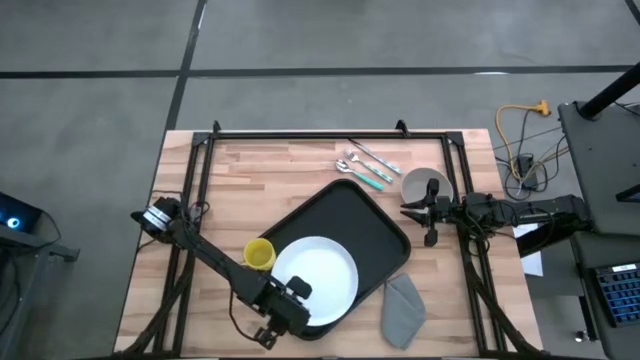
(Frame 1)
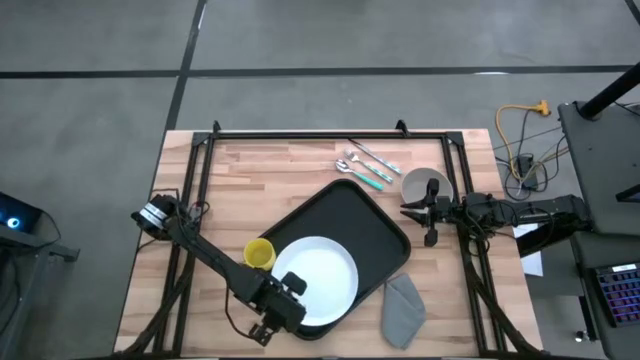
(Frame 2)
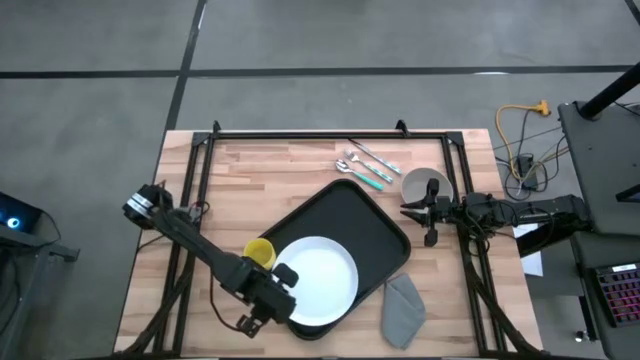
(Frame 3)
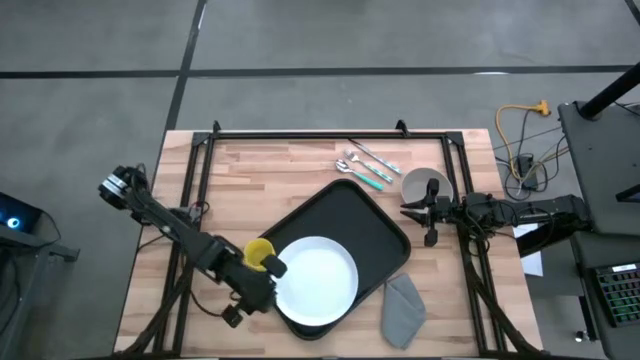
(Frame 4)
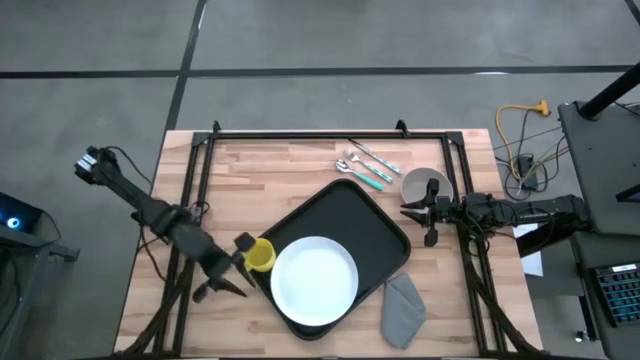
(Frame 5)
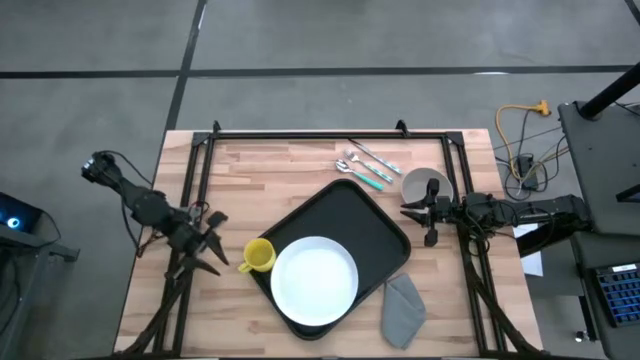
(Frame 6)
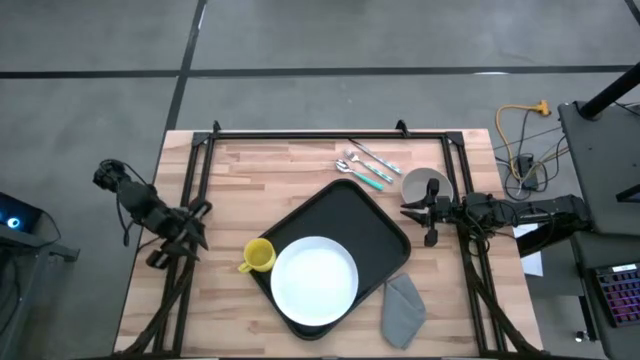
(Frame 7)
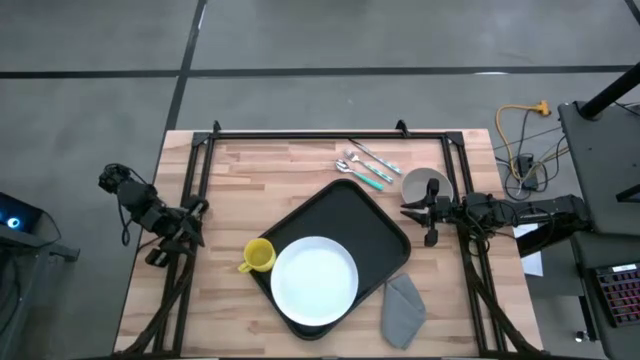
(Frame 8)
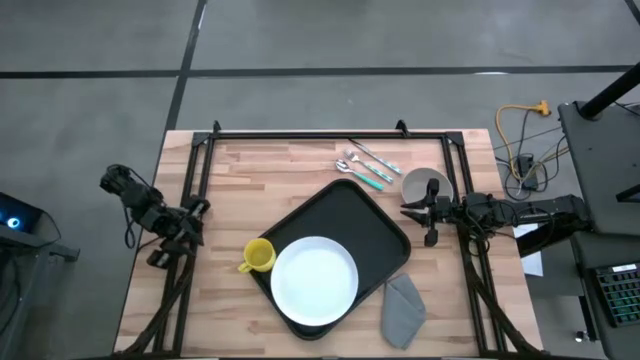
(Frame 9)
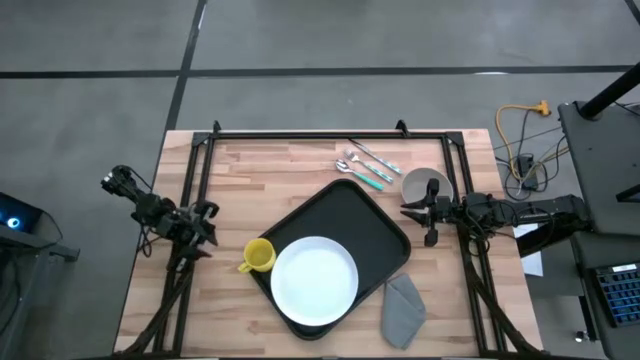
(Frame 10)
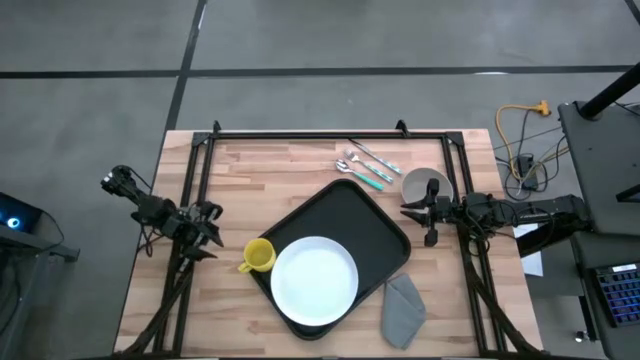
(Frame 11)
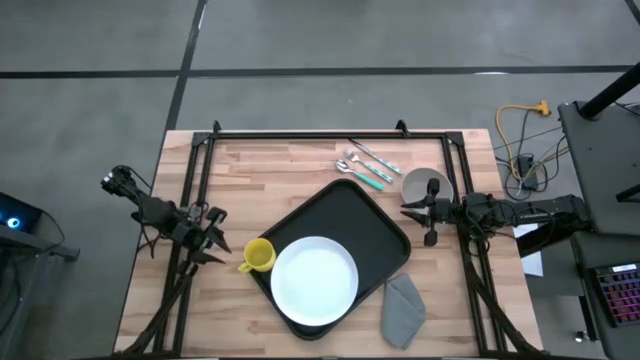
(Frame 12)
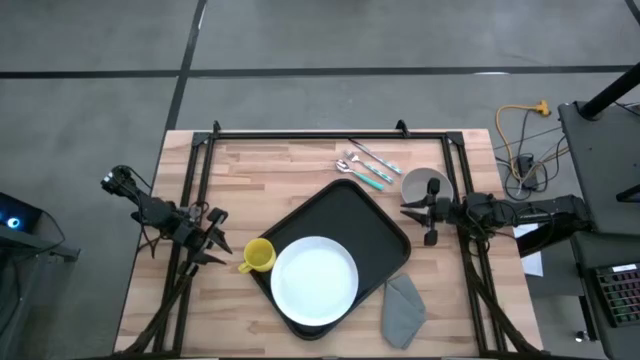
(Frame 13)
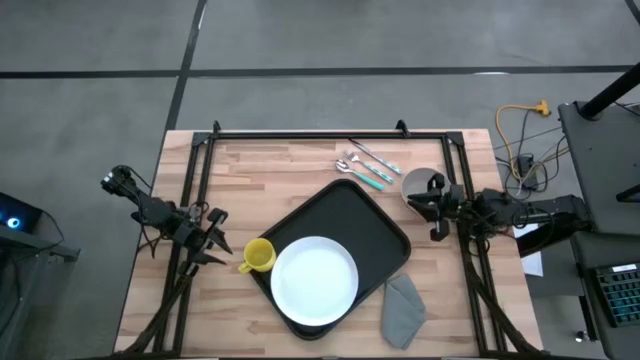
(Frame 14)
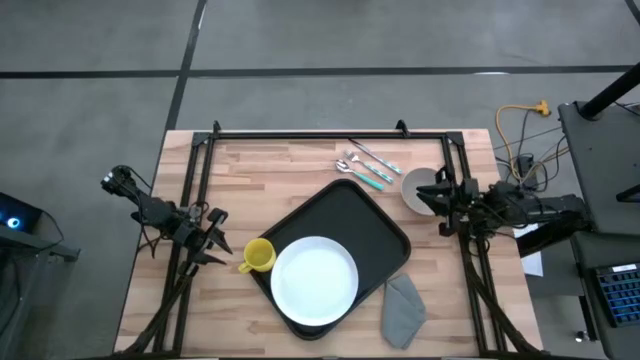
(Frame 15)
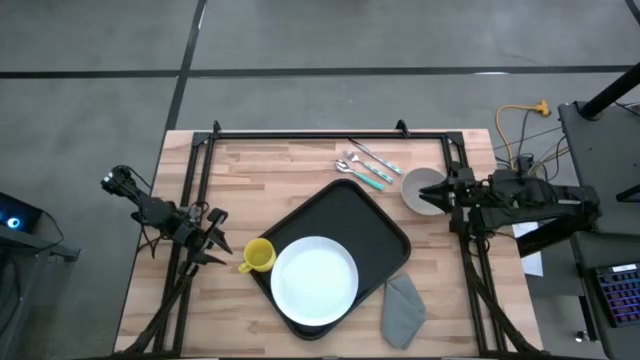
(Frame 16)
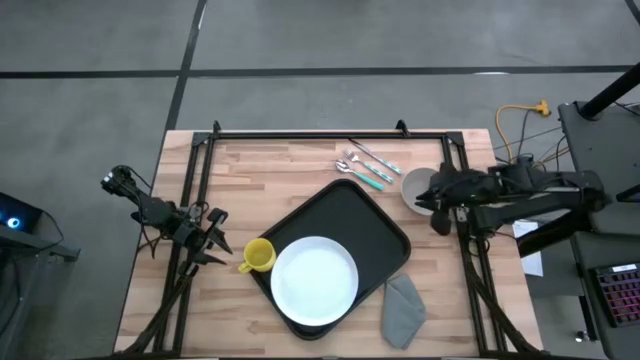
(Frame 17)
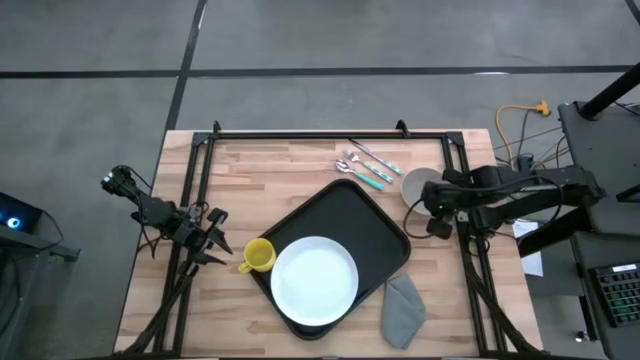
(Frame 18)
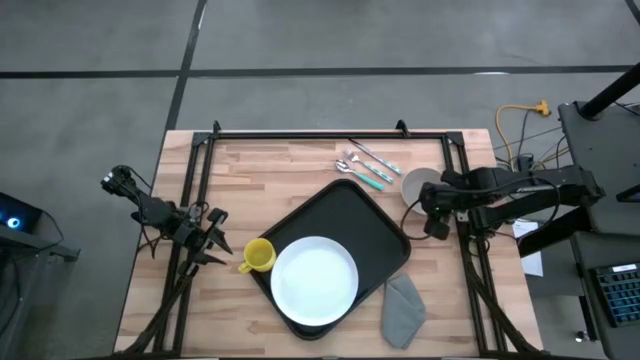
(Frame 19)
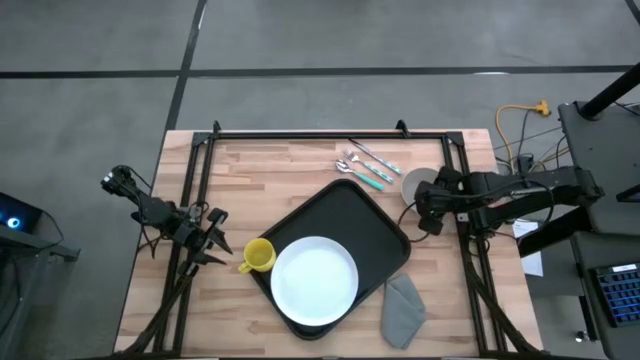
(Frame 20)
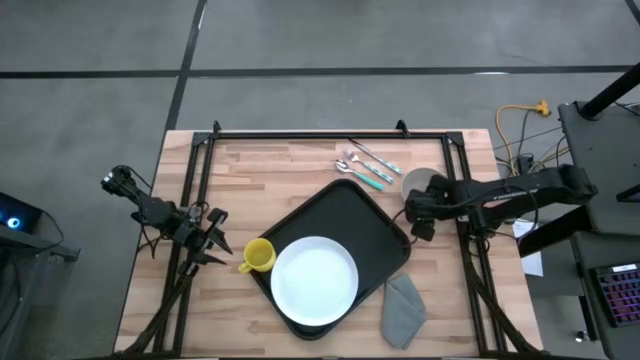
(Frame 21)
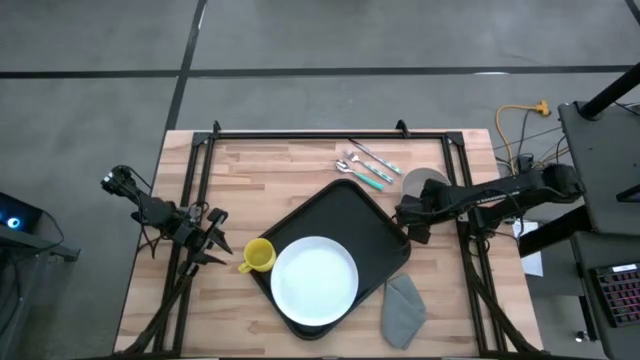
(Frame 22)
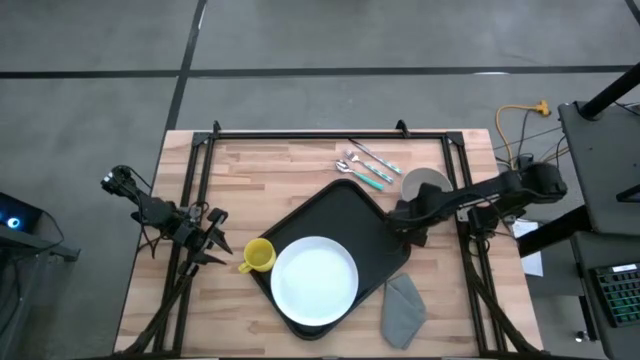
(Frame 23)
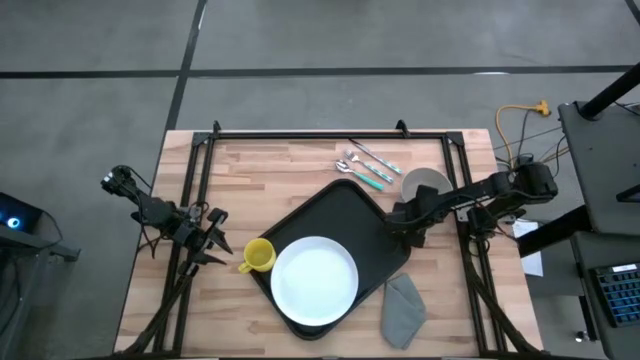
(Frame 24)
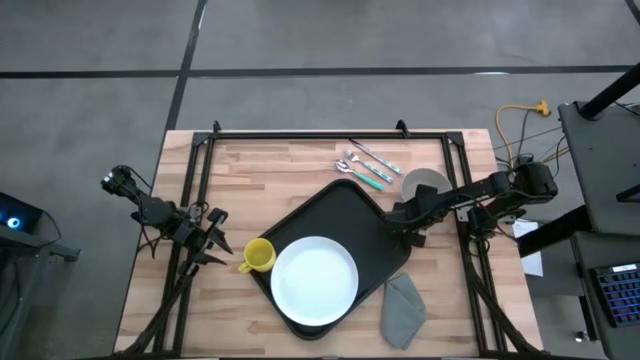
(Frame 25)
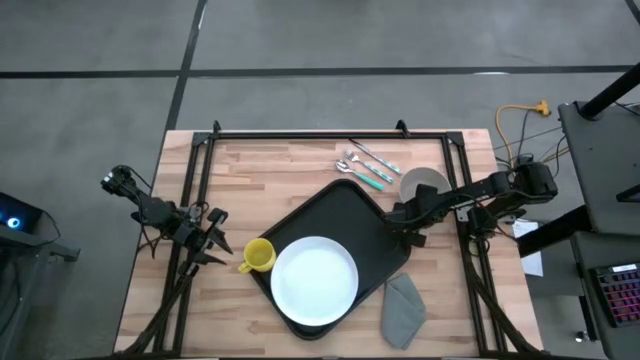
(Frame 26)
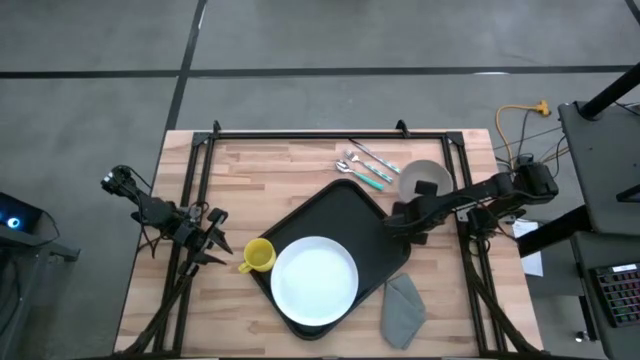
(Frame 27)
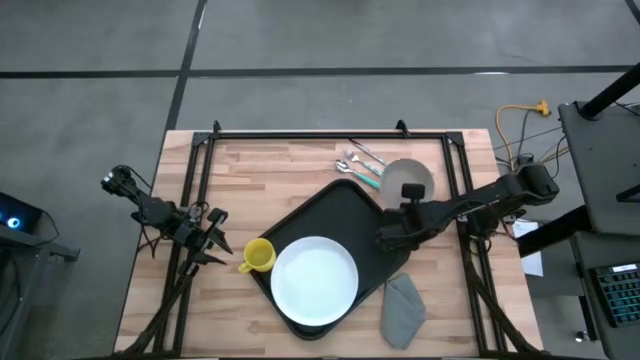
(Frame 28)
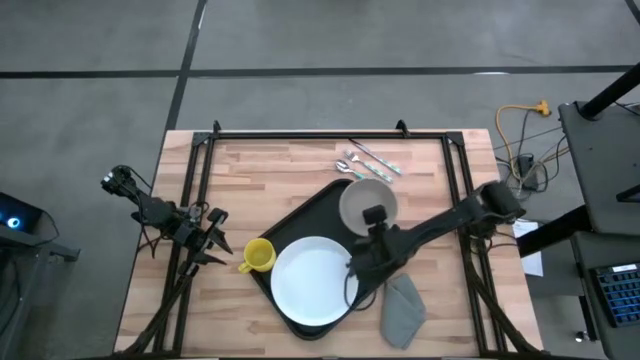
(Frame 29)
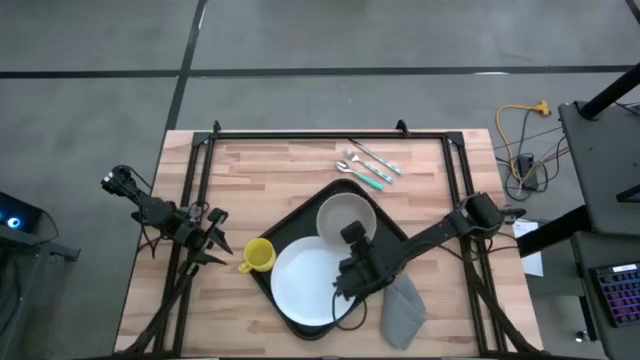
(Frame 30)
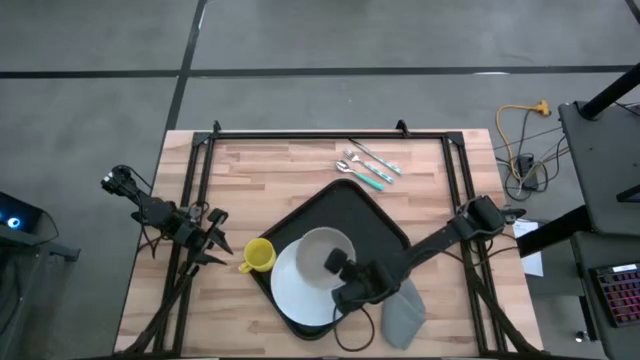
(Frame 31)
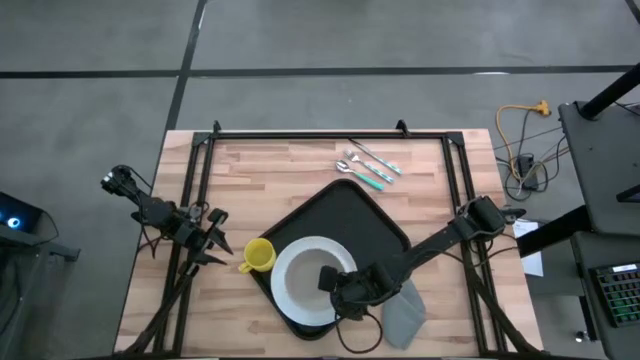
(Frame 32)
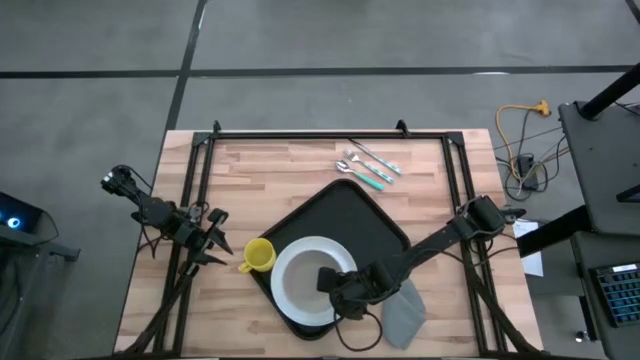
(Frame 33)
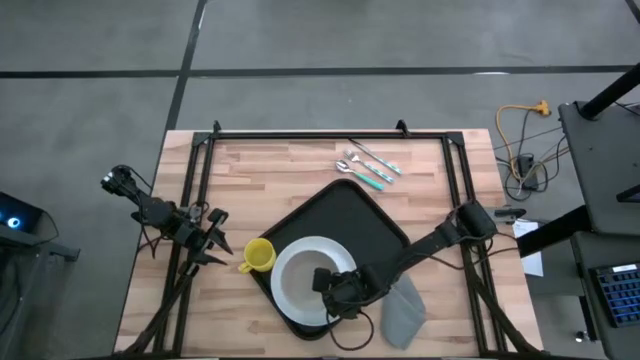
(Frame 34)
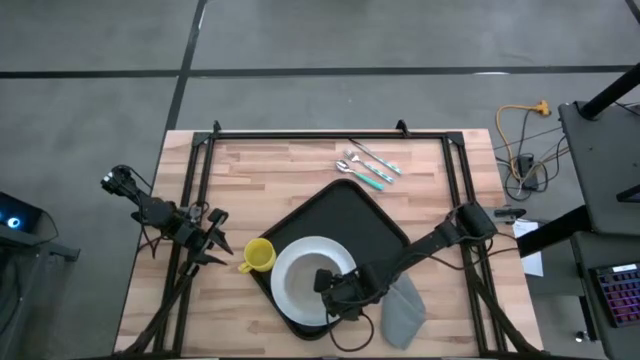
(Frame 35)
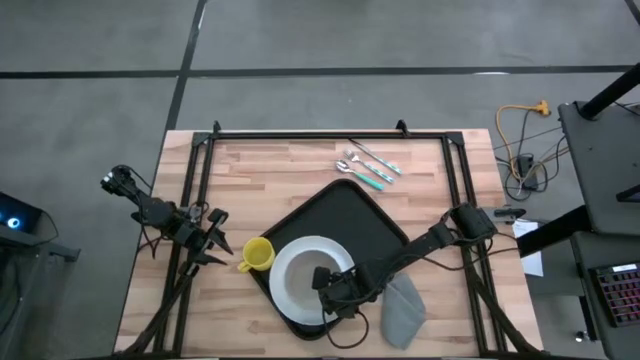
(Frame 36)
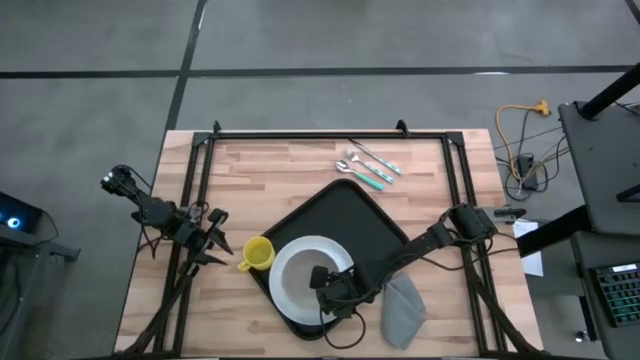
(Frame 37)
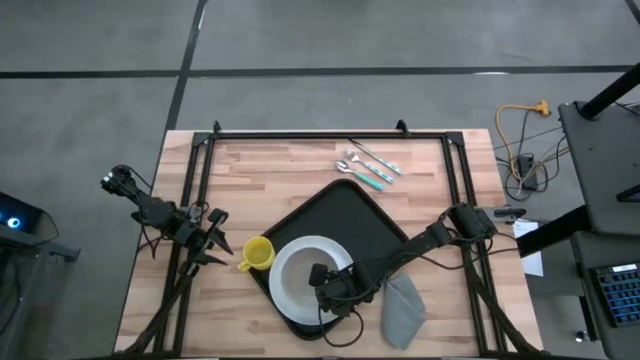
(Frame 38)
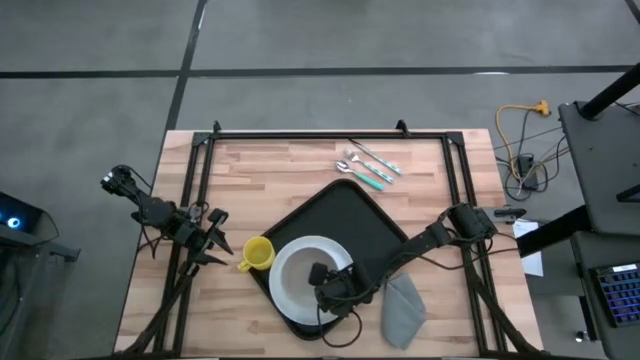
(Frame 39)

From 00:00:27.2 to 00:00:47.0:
Task: Set up tray
Put the brown bowl on the white plate on the black tray
